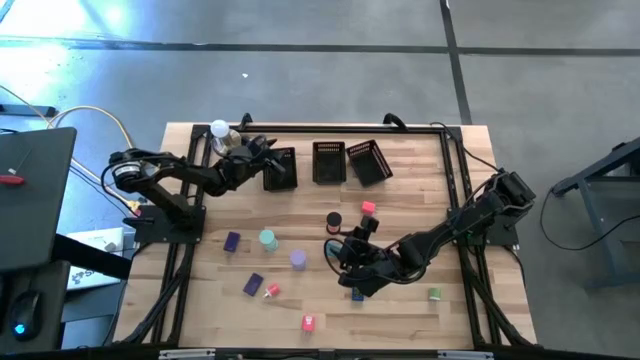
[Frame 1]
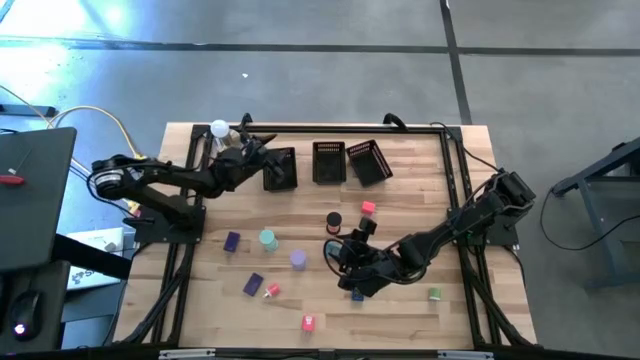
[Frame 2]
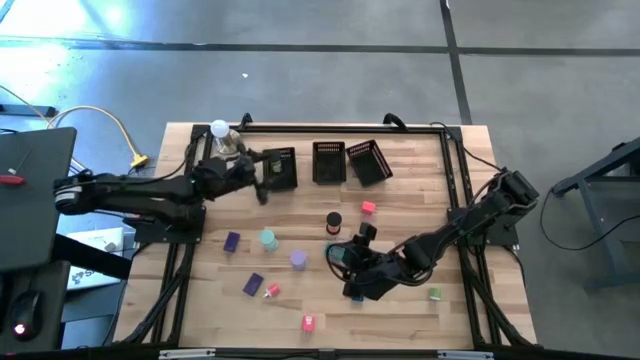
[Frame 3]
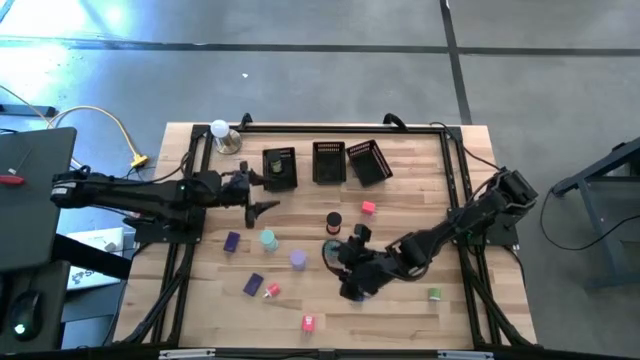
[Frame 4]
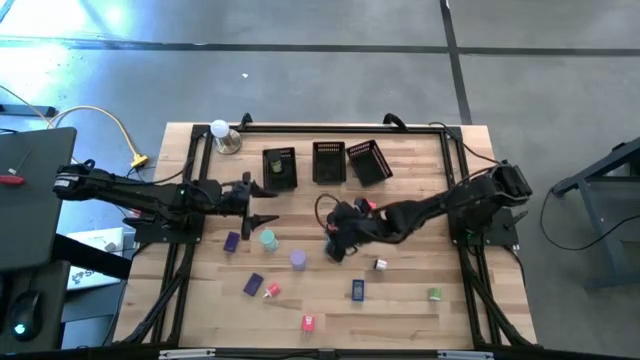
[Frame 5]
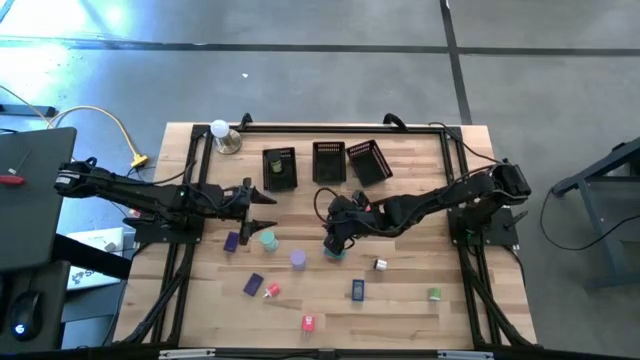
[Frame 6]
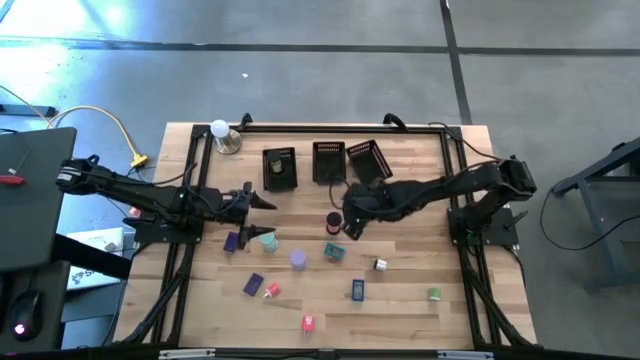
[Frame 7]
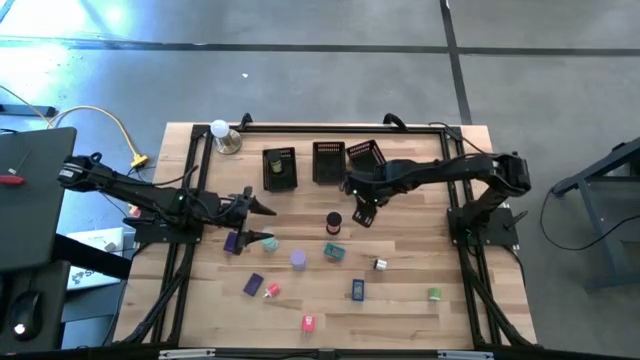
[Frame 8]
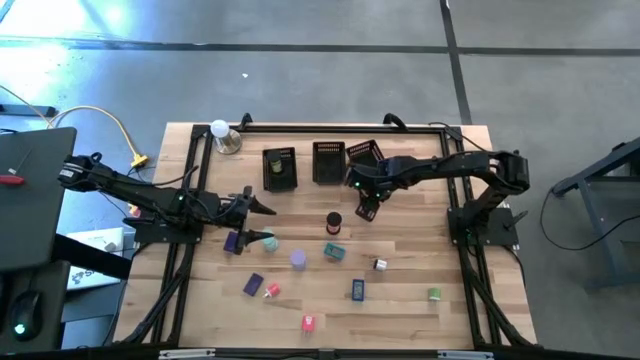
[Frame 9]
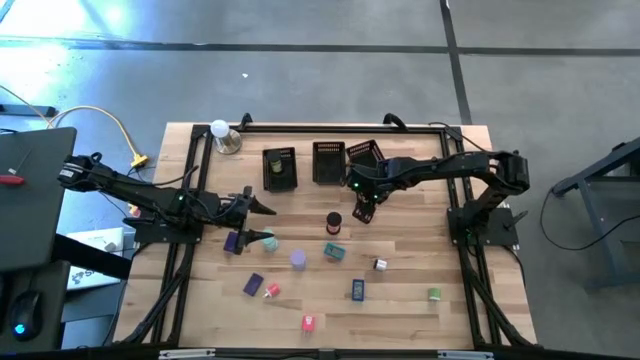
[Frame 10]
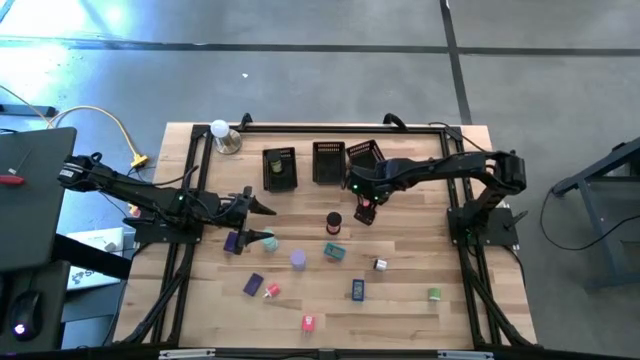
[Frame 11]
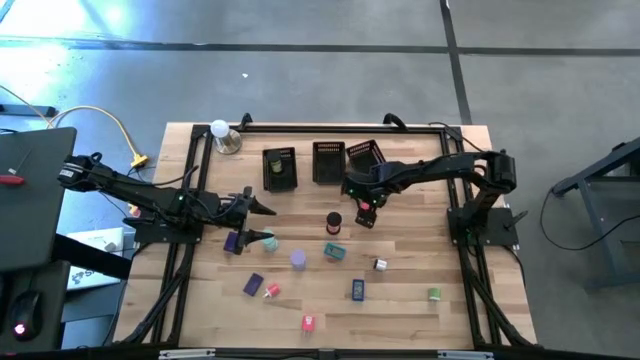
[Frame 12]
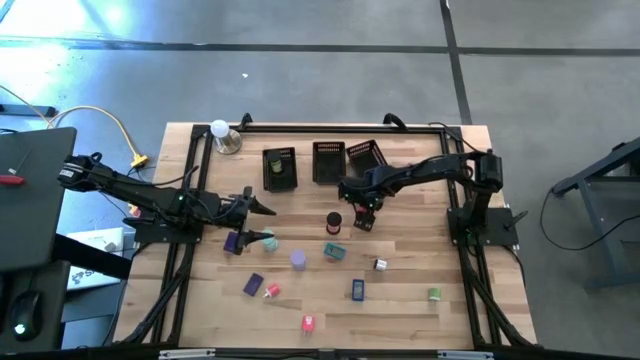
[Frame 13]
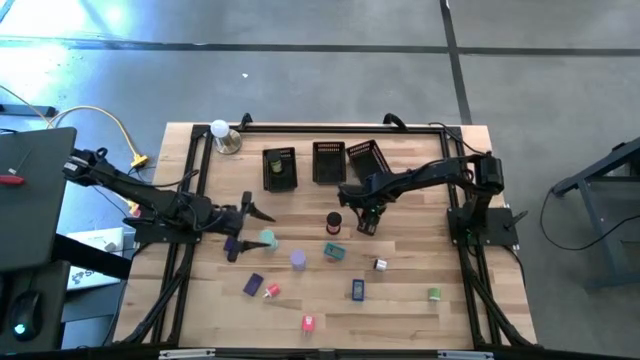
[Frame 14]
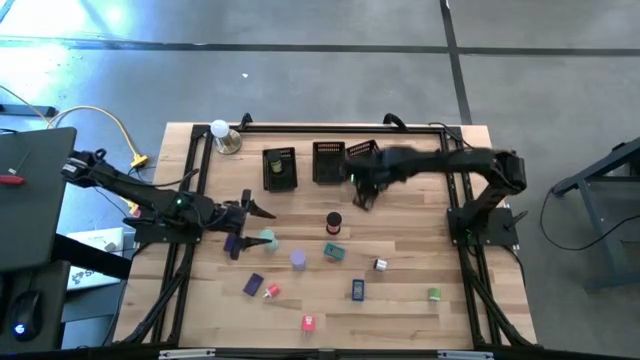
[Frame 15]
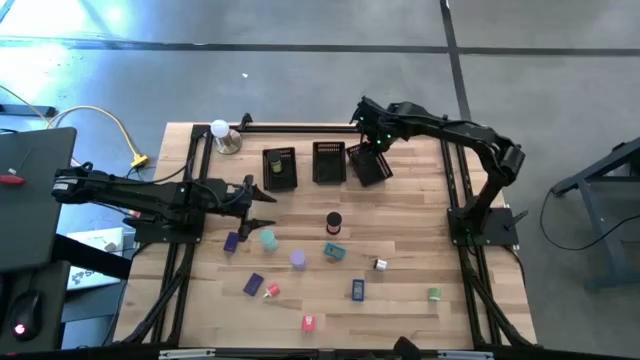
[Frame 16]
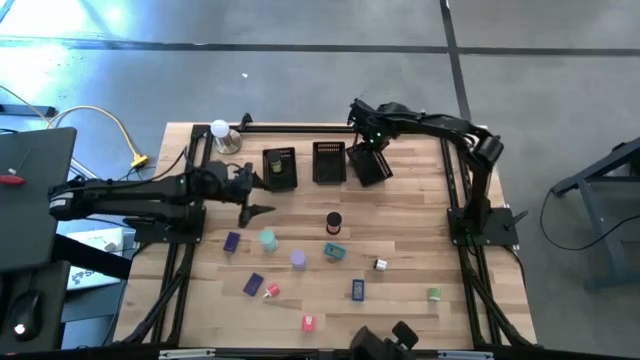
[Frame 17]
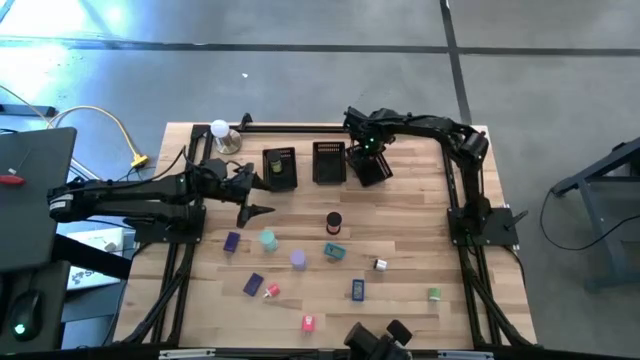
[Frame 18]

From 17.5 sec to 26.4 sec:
Task: Pick & Place Office items
Put the top pink charger adapter into the right black bin

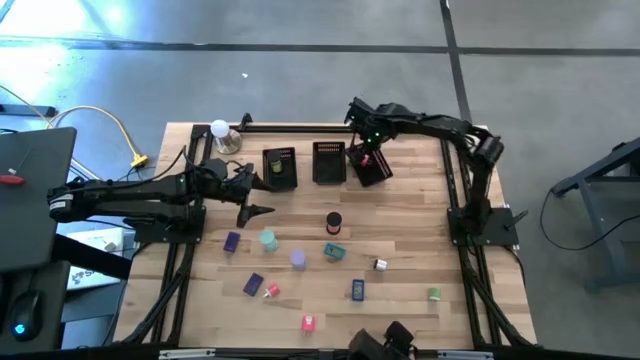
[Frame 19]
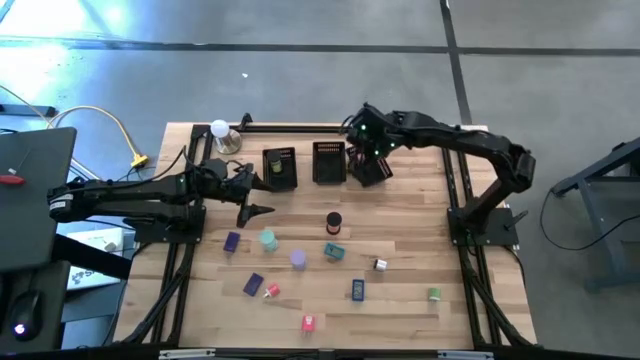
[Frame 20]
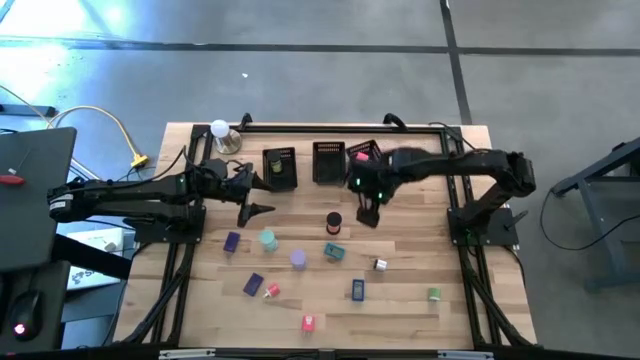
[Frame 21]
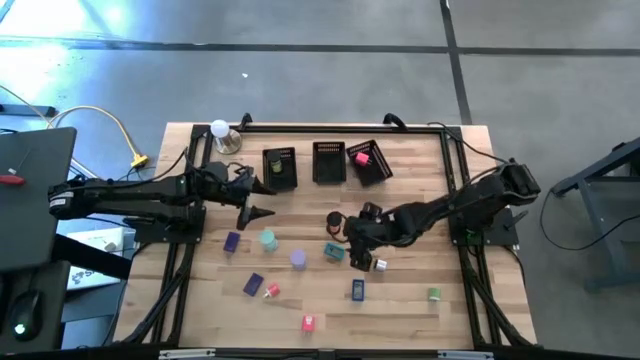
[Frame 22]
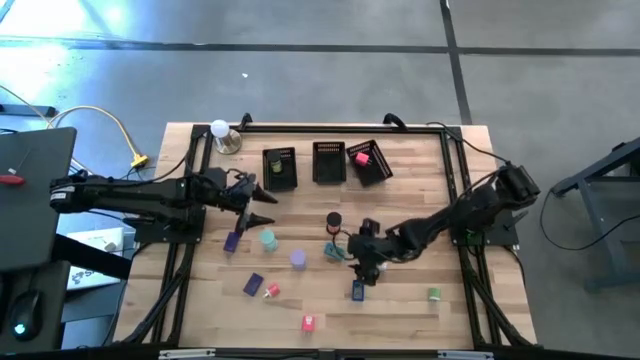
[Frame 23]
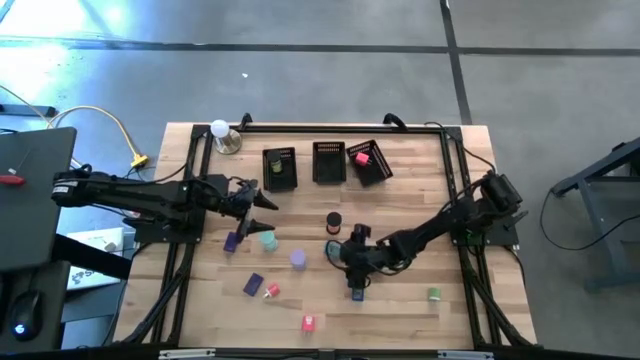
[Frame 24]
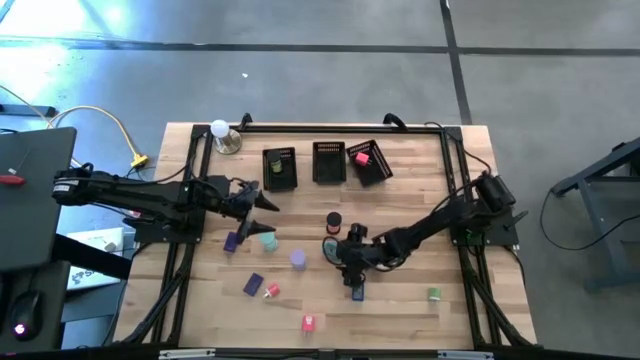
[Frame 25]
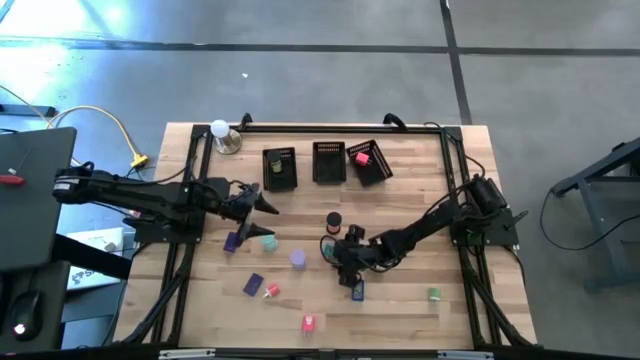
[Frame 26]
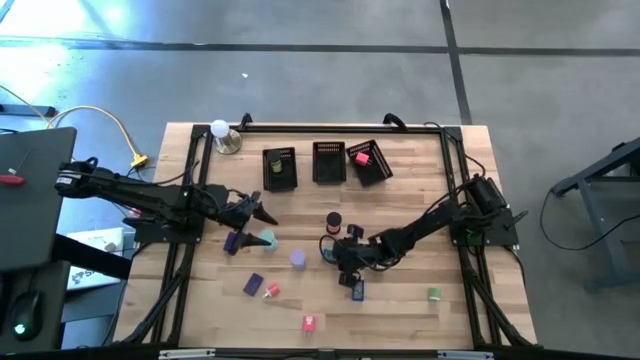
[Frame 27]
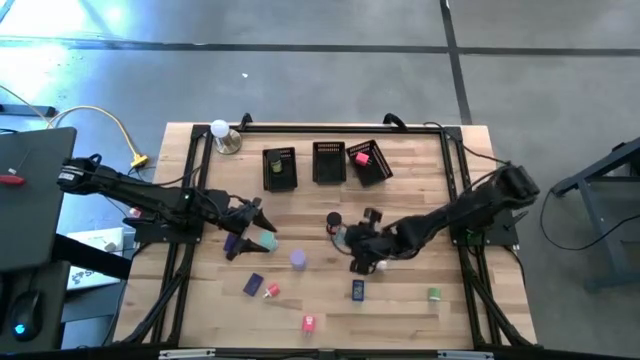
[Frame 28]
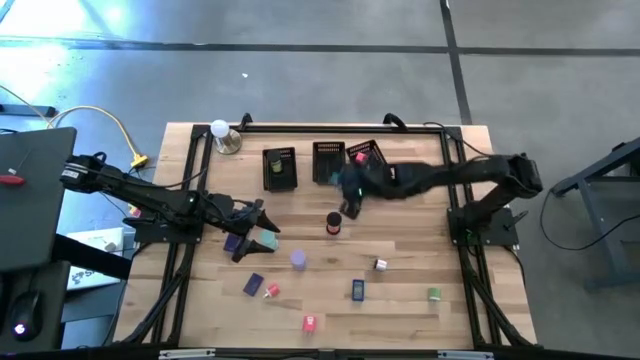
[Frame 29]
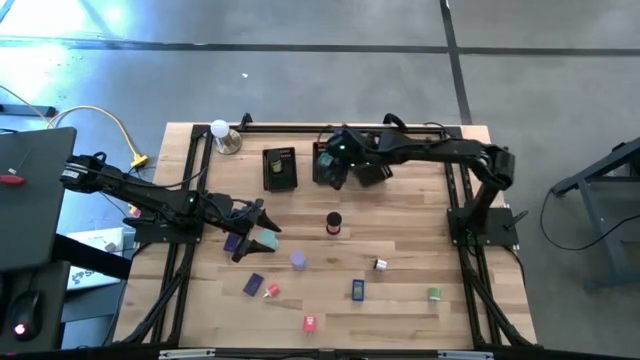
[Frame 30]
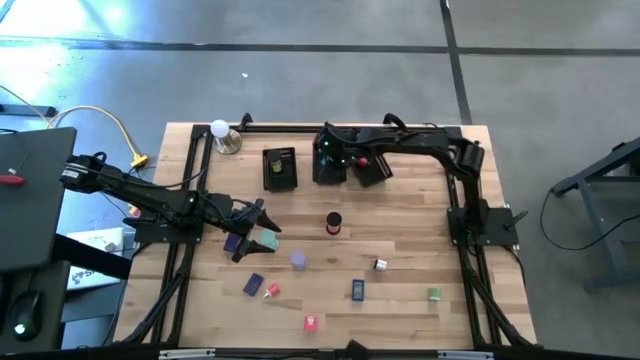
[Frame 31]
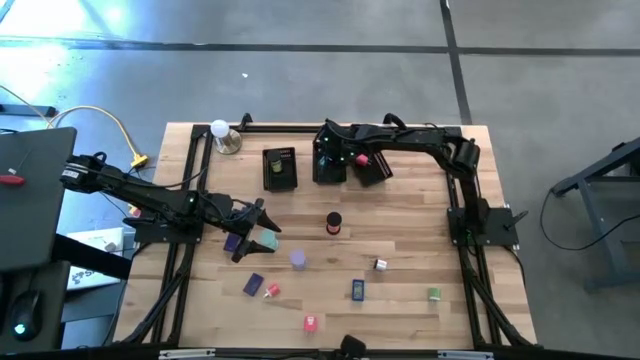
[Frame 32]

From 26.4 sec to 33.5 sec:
Put the light blue digital timer into the middle black bin

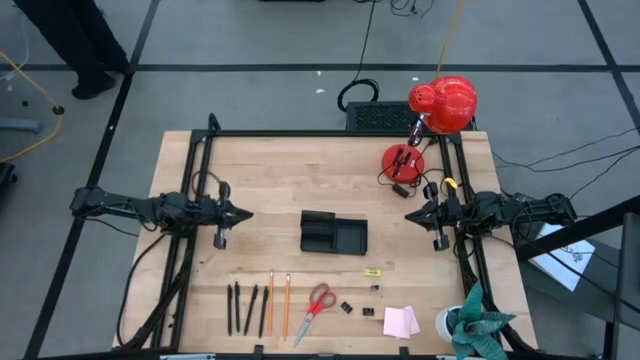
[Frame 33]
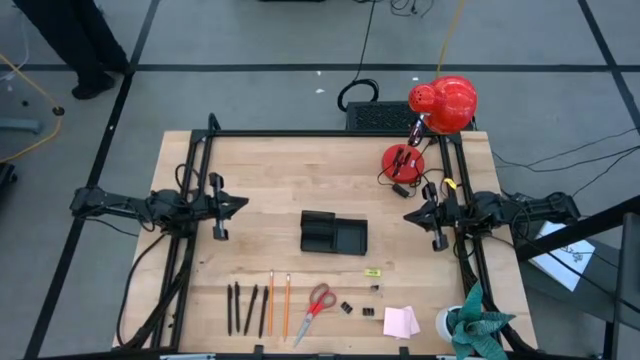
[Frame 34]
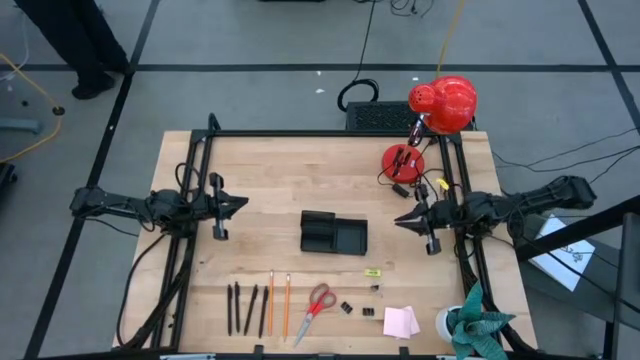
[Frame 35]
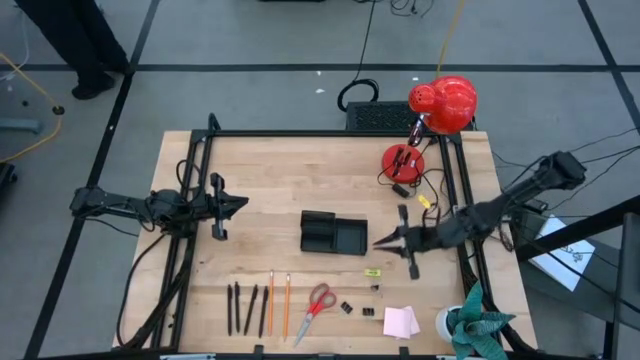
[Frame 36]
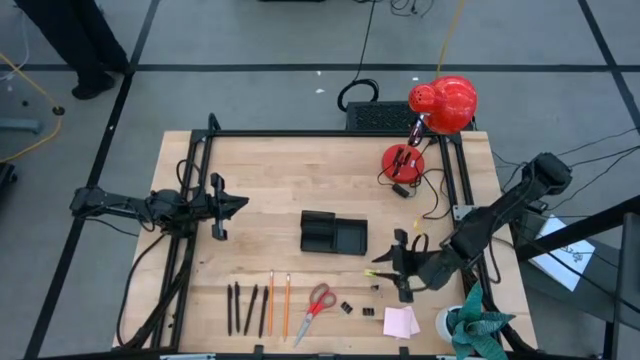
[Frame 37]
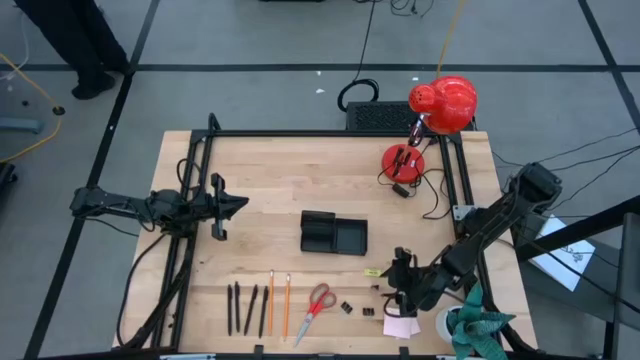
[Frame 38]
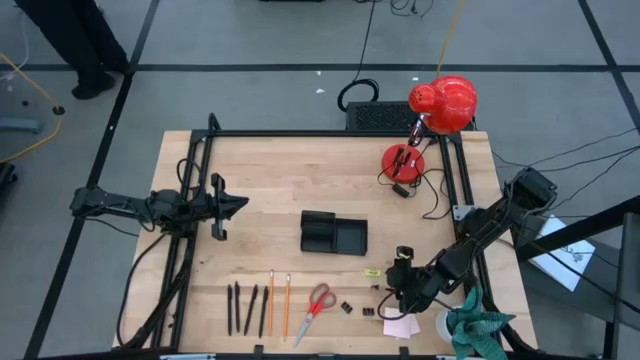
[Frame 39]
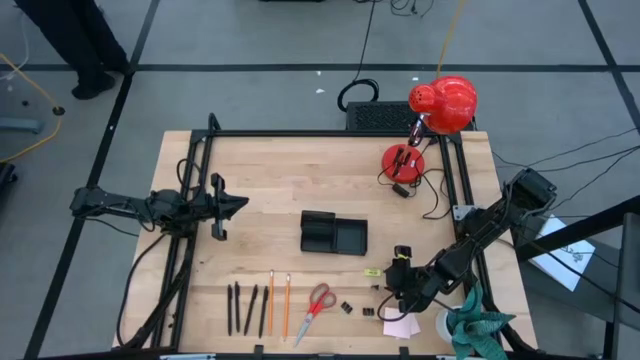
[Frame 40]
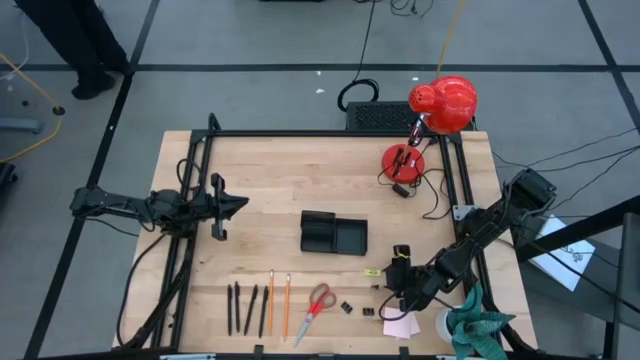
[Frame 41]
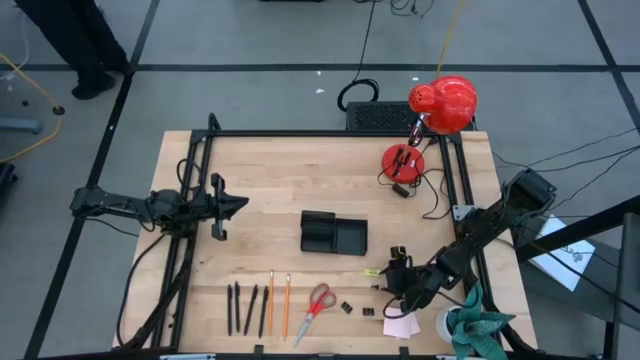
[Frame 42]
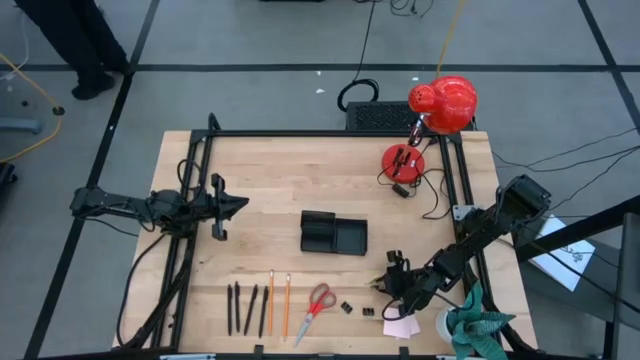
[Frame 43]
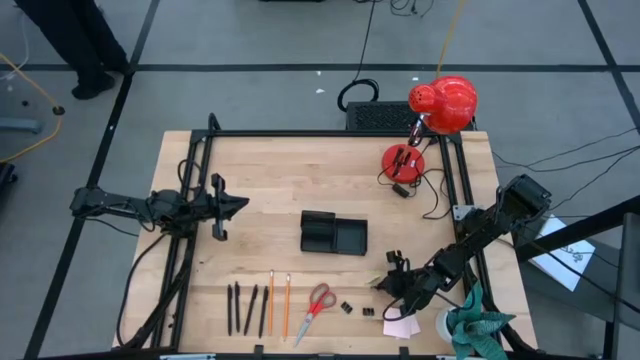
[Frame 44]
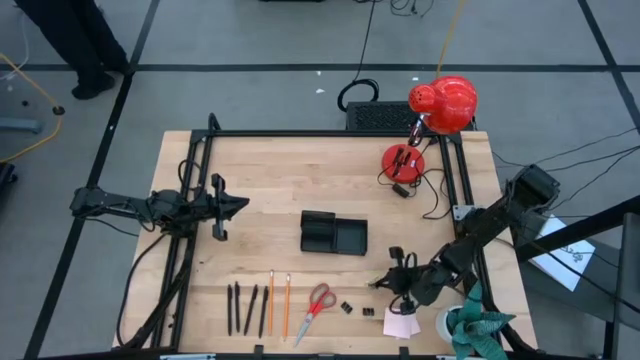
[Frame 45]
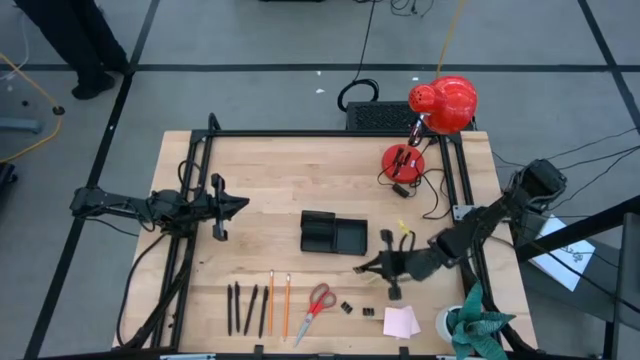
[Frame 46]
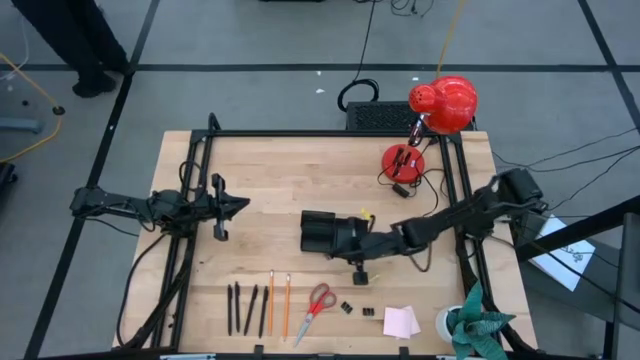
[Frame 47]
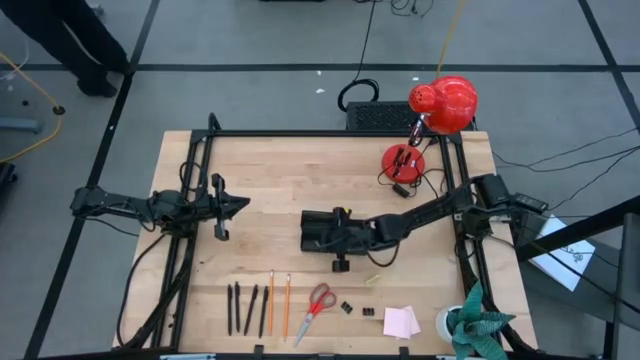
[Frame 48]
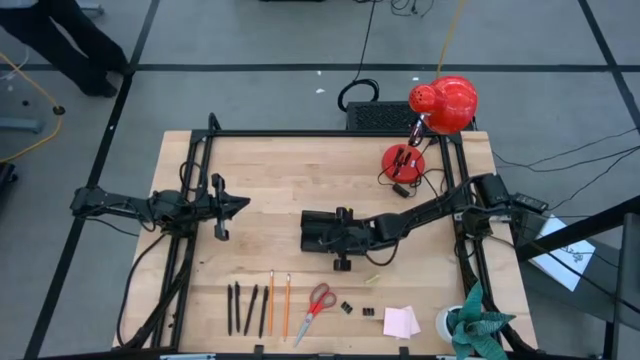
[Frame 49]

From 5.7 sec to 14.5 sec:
Task: Pick and place office supplies into organizer
Put the top right binder clip into the desk organizer
